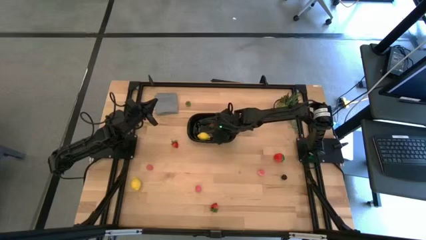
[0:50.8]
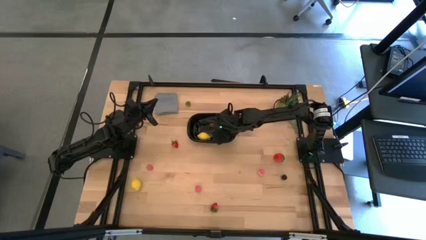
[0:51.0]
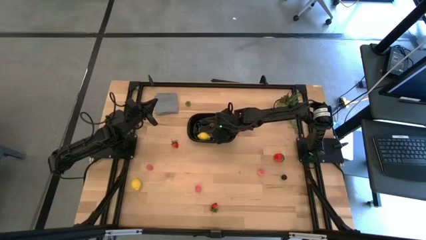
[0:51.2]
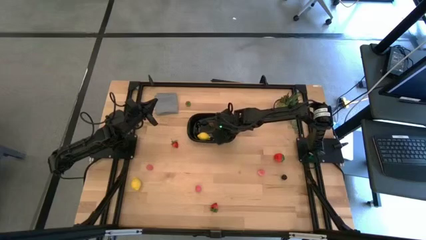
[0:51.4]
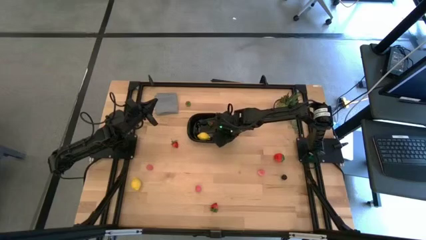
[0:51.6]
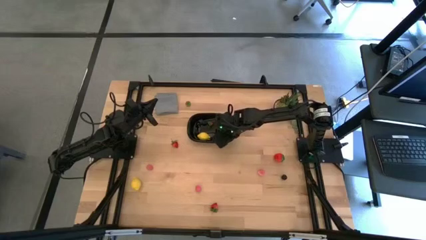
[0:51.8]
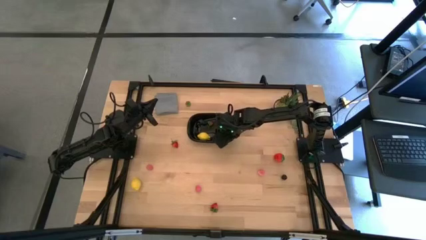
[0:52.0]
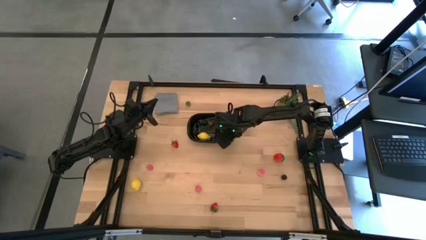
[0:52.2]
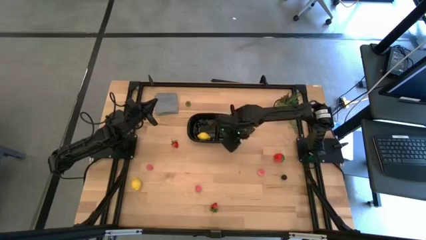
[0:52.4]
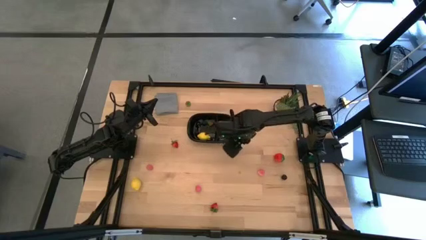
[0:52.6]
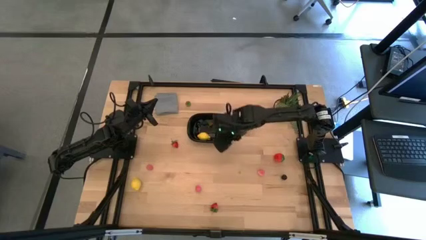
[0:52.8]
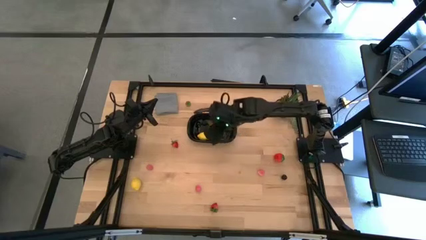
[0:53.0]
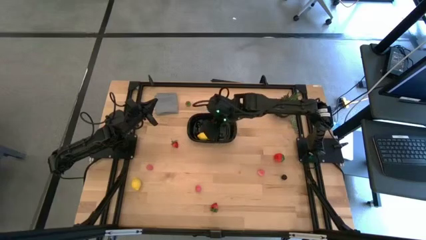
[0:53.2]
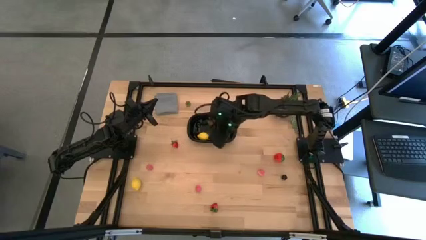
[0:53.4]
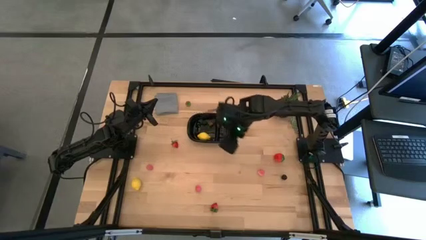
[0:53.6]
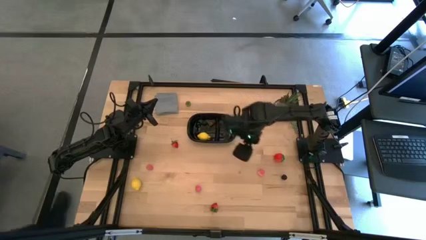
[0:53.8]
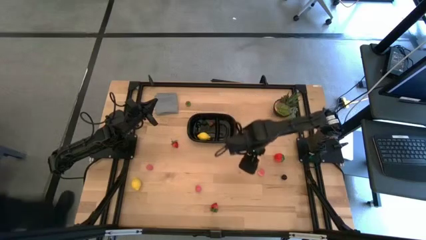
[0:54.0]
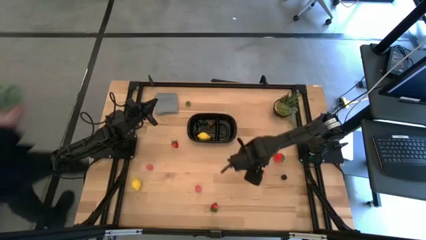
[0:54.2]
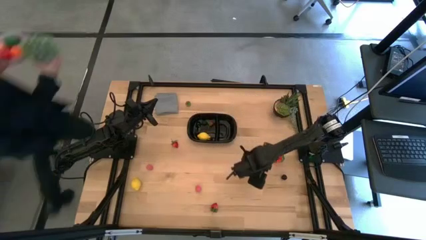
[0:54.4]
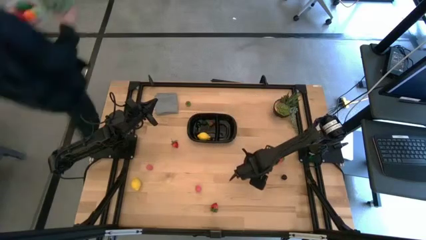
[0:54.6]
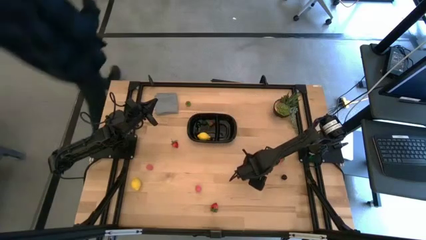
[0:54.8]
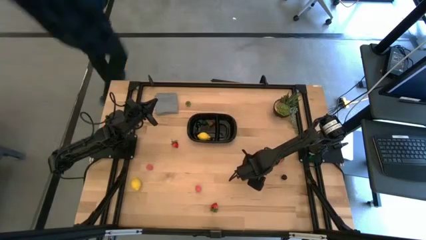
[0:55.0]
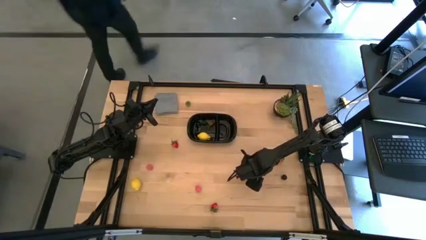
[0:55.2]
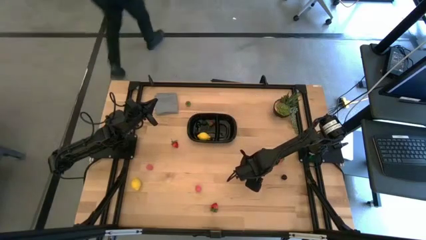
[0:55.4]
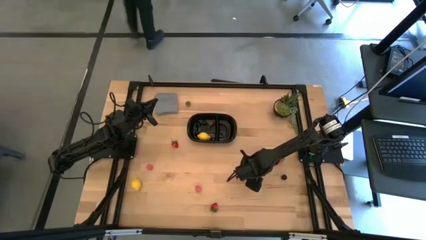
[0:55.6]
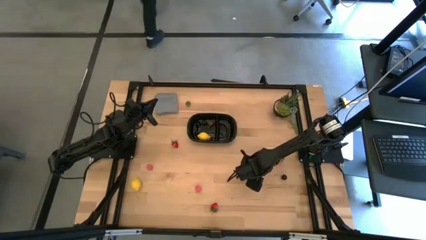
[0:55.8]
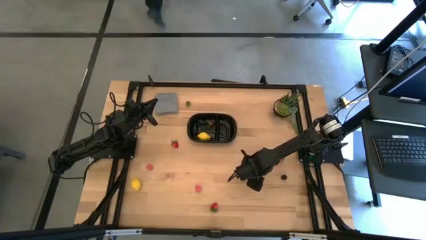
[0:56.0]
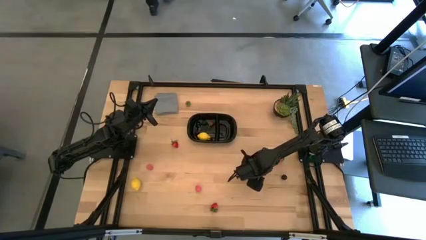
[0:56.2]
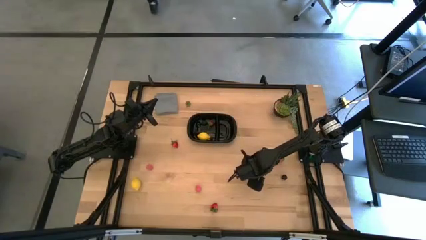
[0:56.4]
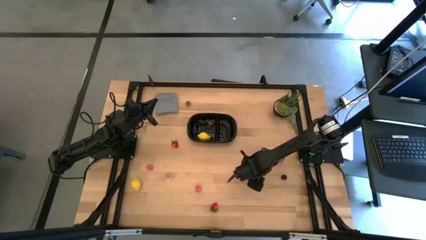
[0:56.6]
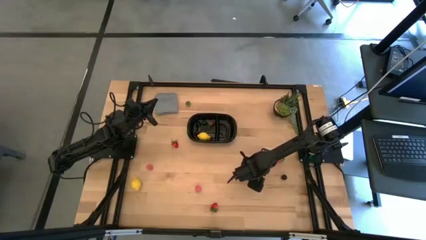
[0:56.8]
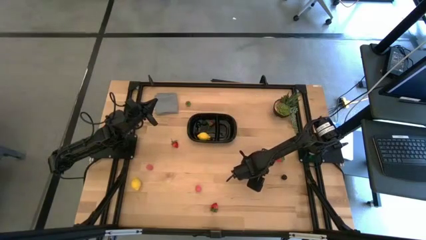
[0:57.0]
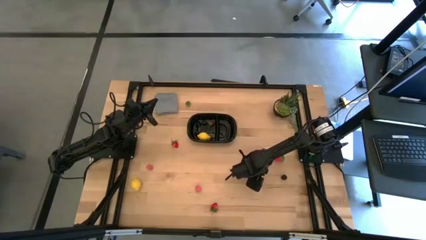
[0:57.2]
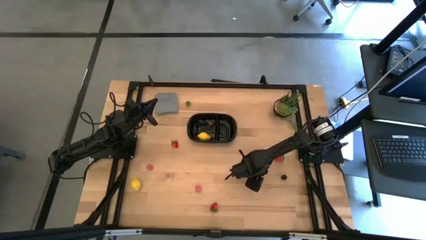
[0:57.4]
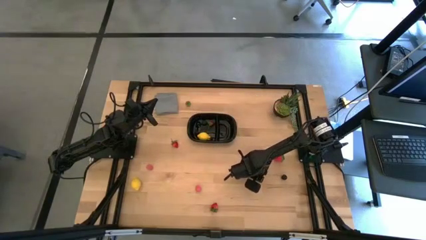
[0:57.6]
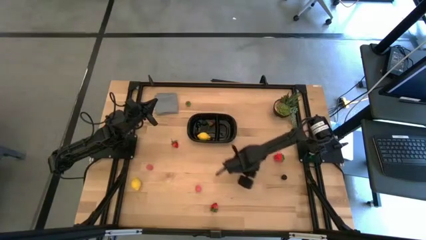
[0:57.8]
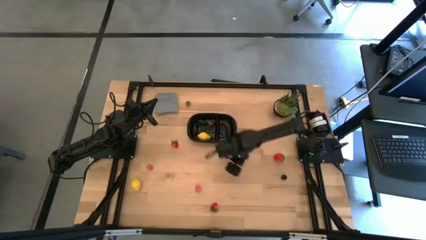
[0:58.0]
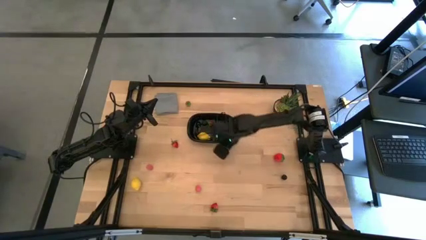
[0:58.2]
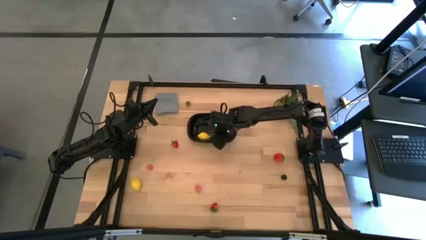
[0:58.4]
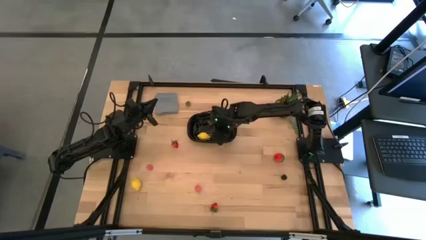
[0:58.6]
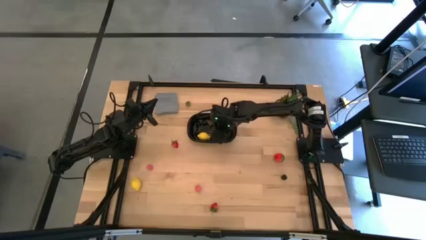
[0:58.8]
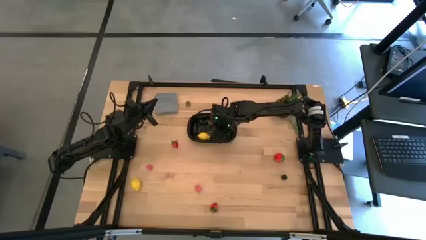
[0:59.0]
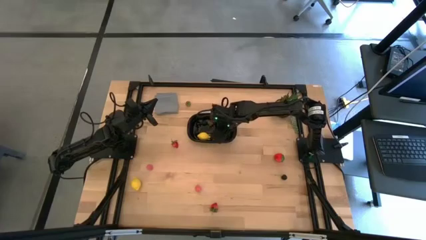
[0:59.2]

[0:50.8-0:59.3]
Task: Pick and placing Produce into tupperware
Put the right pink peach into the black container

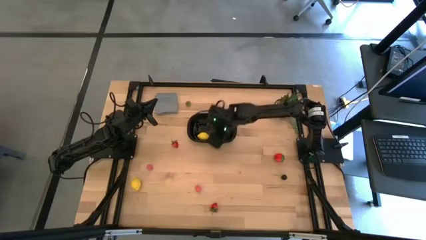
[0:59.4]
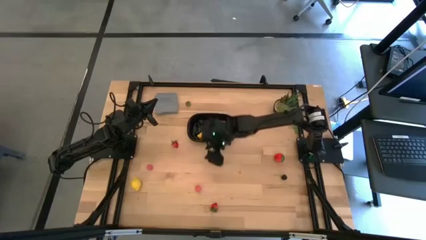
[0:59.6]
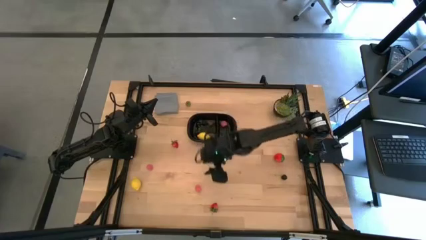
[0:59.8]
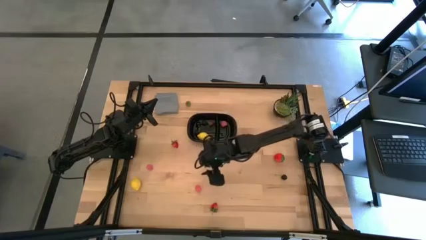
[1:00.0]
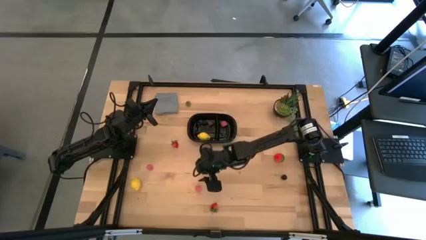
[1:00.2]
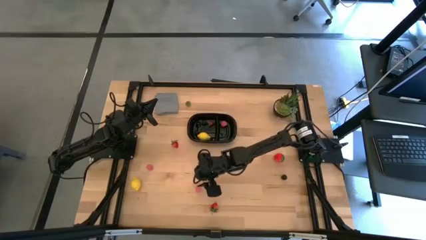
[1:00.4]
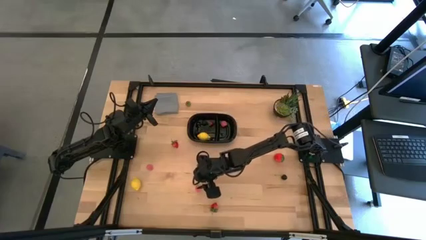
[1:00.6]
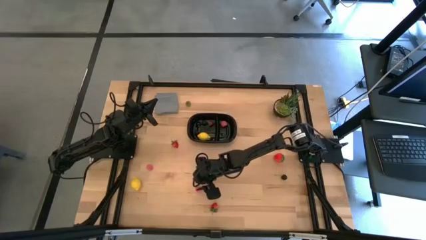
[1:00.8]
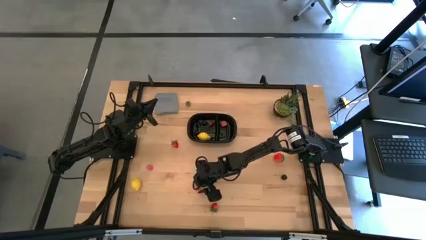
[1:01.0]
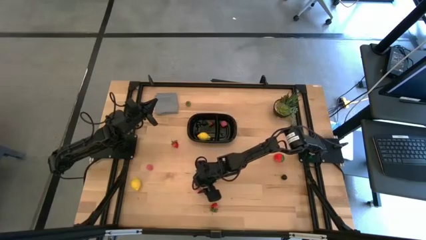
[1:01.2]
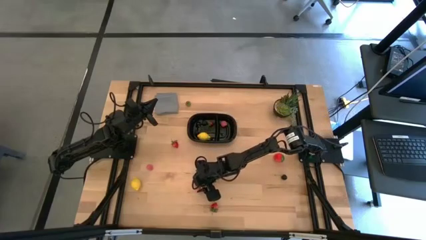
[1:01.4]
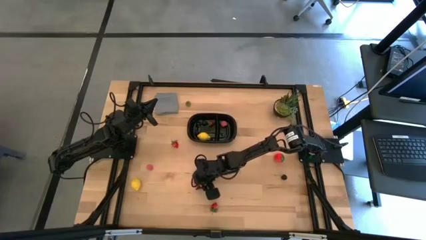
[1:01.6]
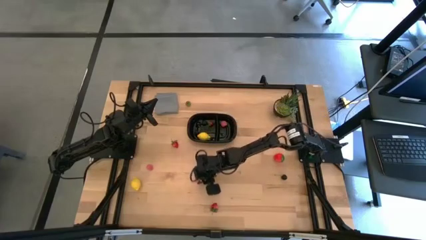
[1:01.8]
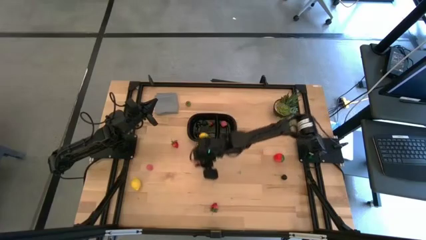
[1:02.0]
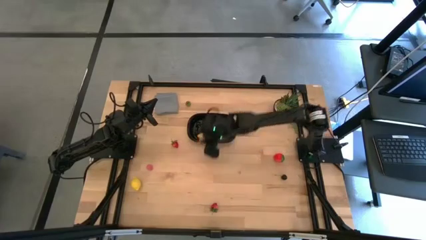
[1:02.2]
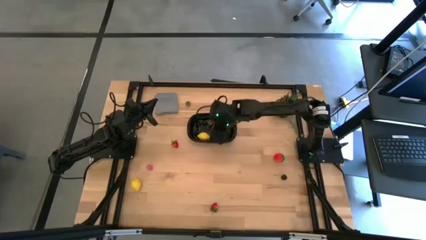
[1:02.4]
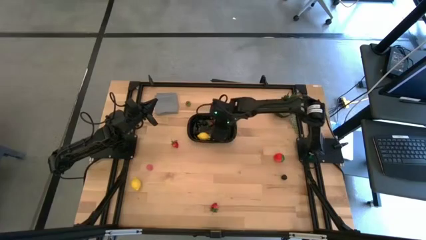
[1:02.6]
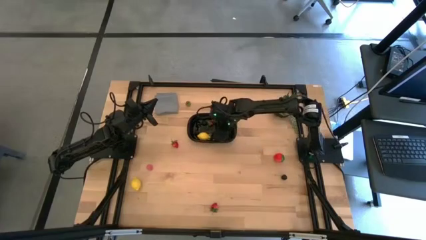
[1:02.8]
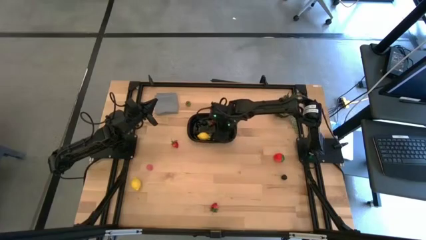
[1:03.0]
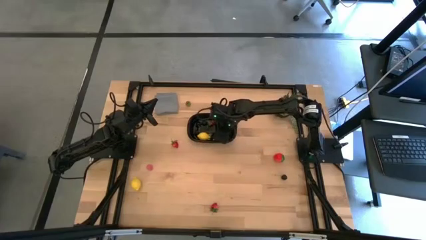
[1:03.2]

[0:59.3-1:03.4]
Put the right peach into the black container

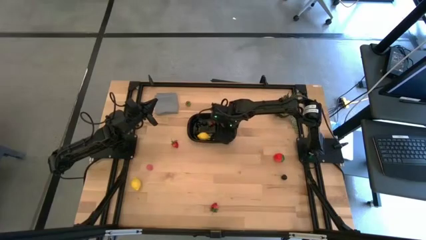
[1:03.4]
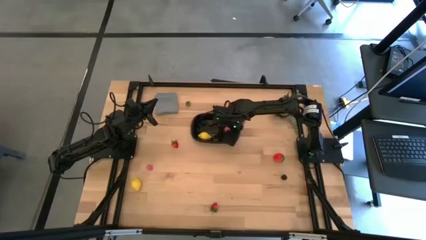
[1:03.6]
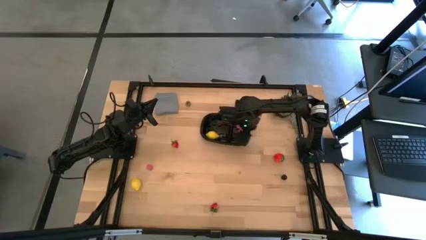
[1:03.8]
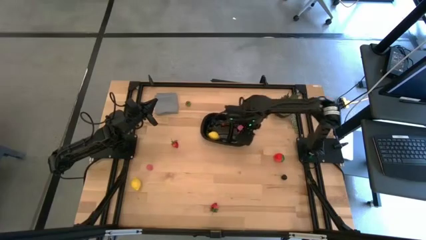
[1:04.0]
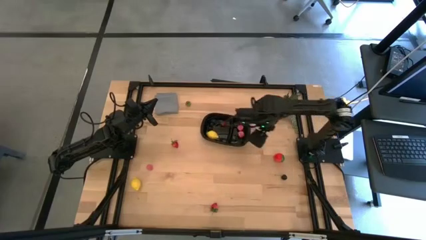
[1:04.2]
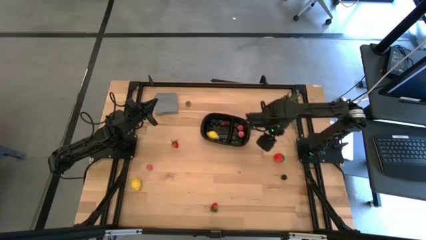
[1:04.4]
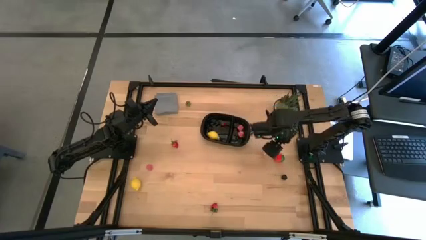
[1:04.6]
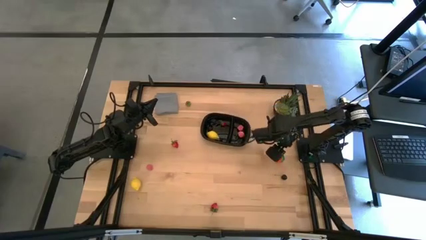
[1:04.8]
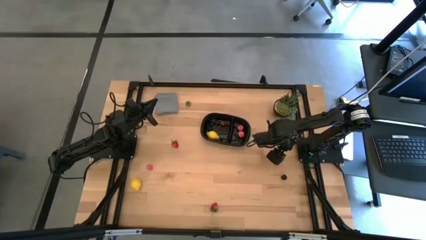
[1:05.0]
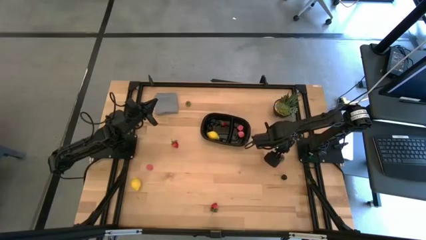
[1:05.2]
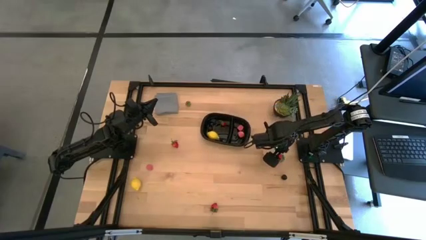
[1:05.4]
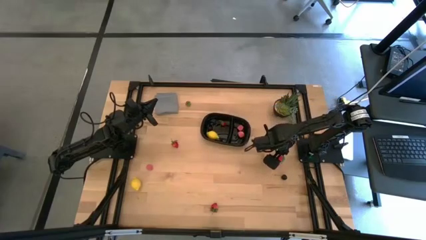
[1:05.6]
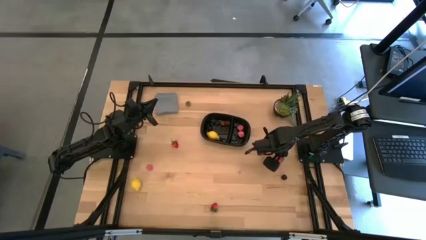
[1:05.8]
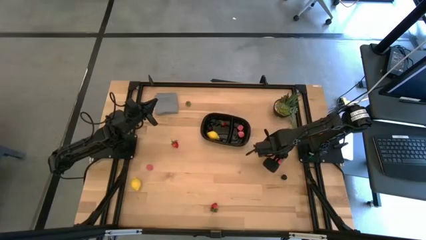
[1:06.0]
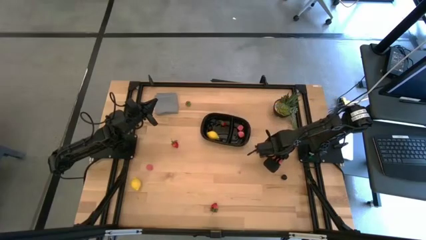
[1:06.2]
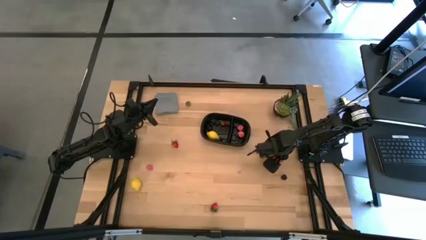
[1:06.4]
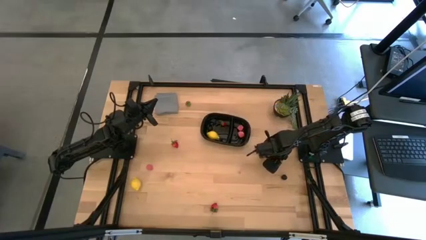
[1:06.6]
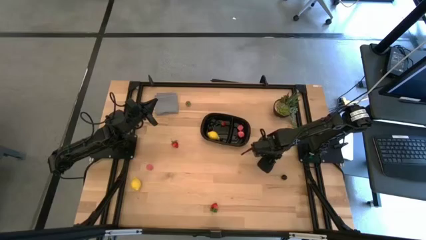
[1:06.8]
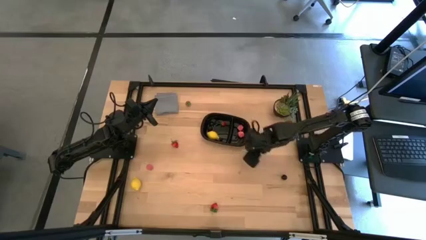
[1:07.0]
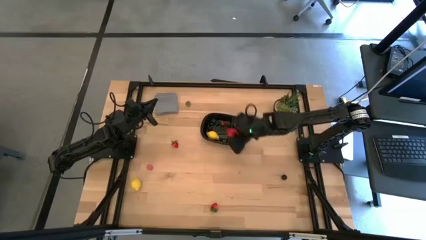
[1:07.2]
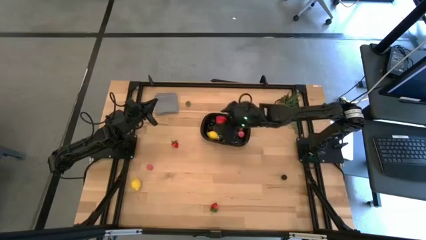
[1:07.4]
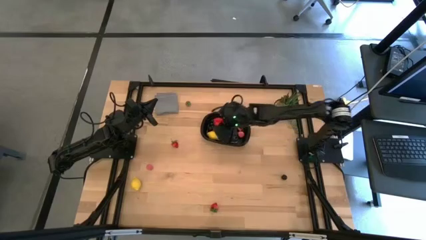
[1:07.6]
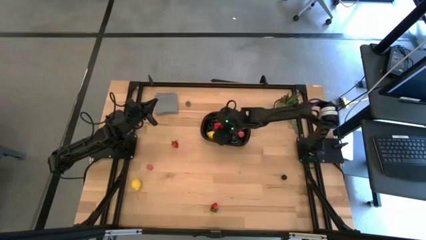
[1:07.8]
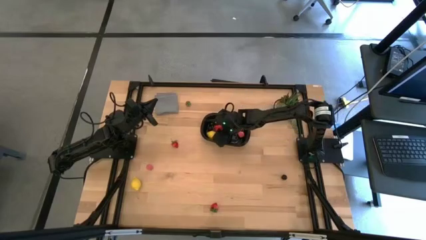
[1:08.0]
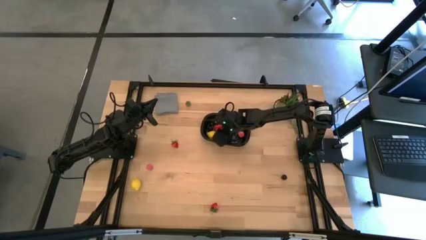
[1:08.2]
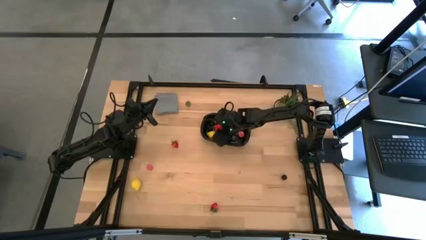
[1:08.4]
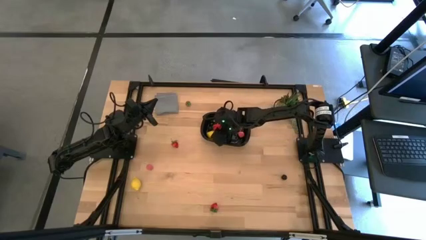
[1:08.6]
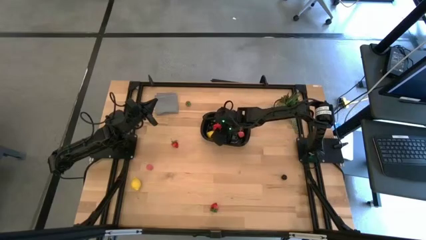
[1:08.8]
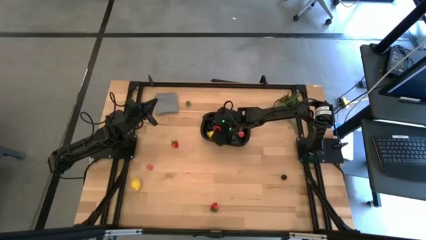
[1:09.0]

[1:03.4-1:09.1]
Put the right red strawberry into the black container
